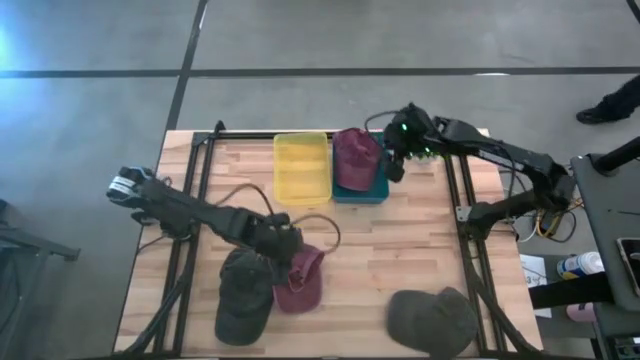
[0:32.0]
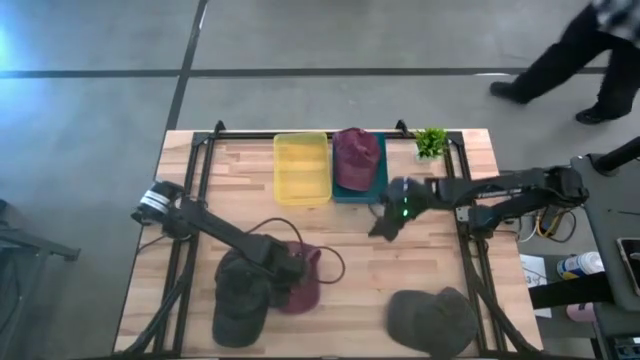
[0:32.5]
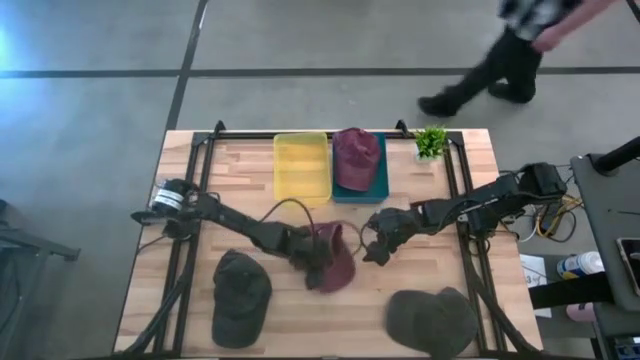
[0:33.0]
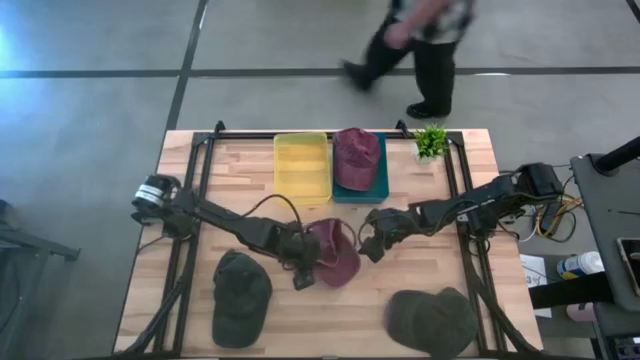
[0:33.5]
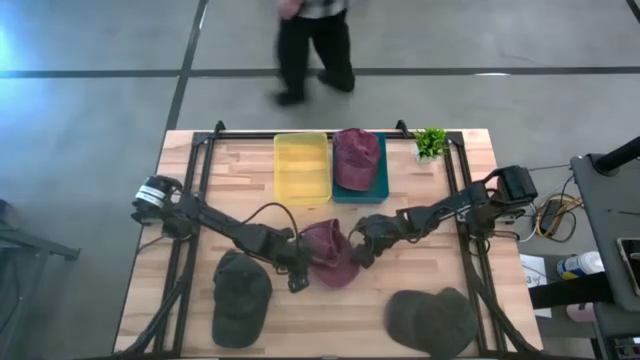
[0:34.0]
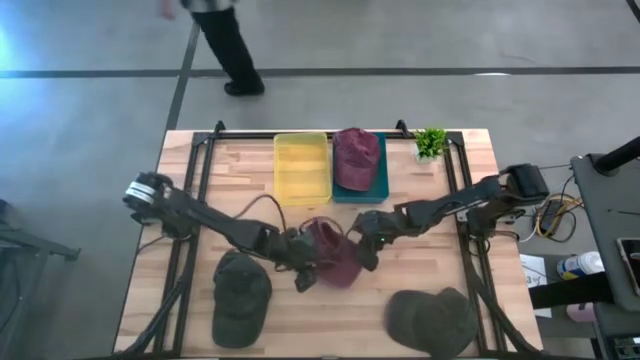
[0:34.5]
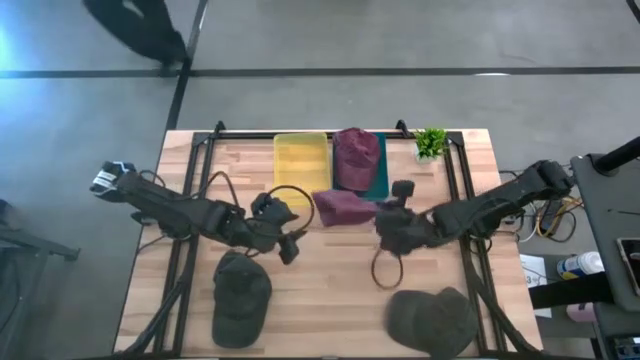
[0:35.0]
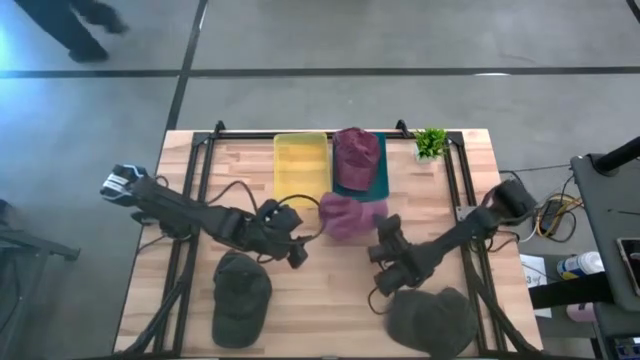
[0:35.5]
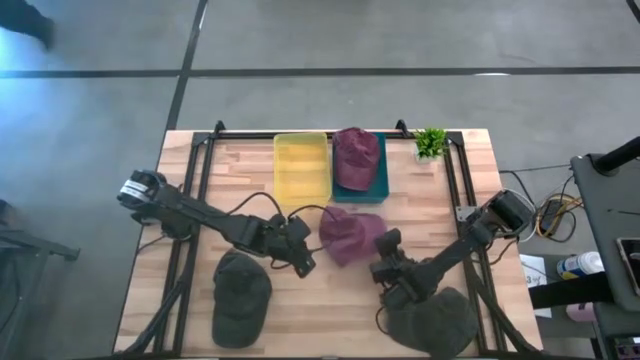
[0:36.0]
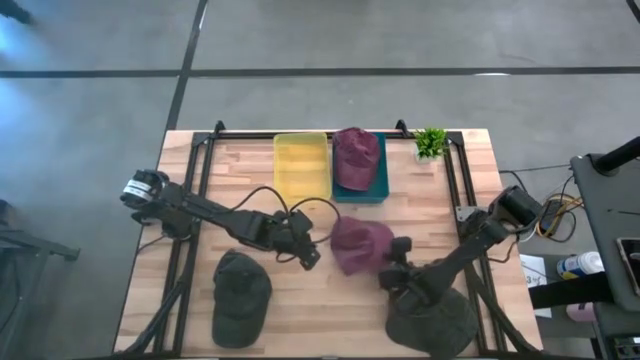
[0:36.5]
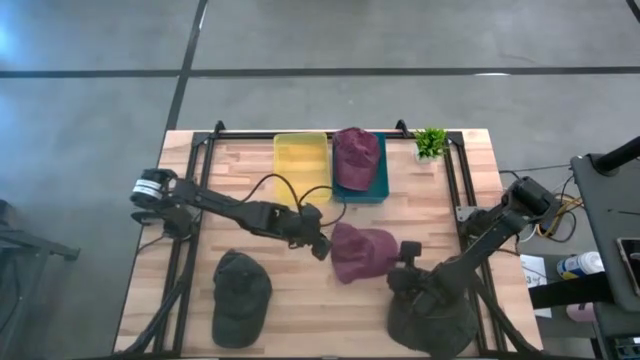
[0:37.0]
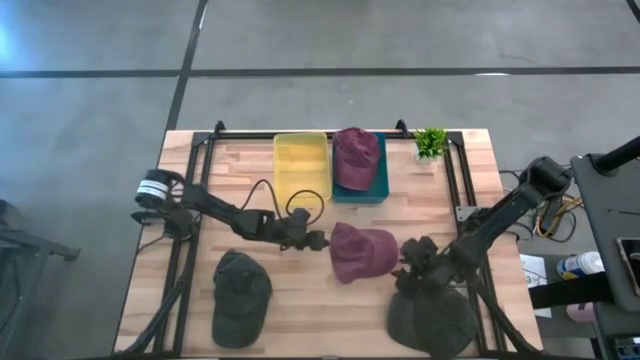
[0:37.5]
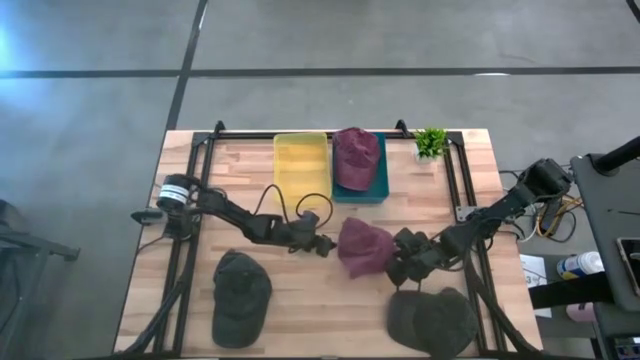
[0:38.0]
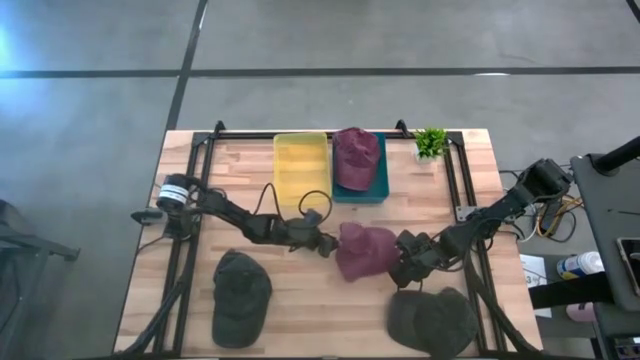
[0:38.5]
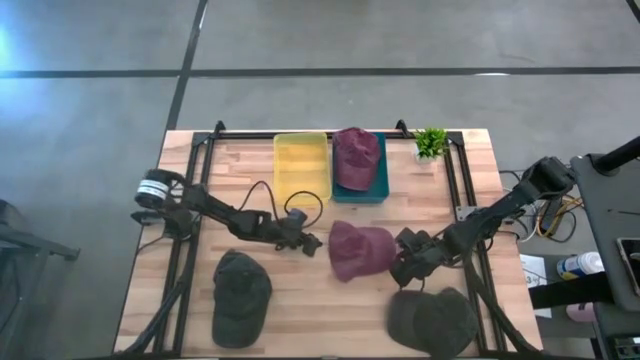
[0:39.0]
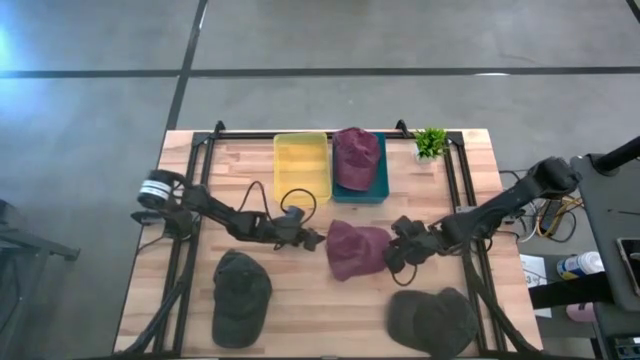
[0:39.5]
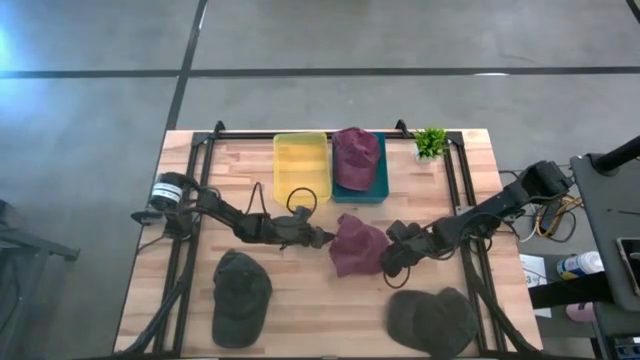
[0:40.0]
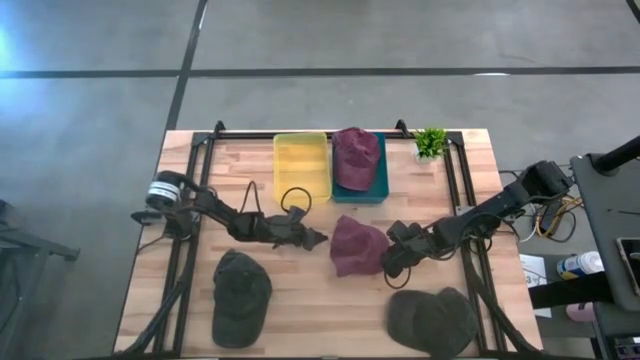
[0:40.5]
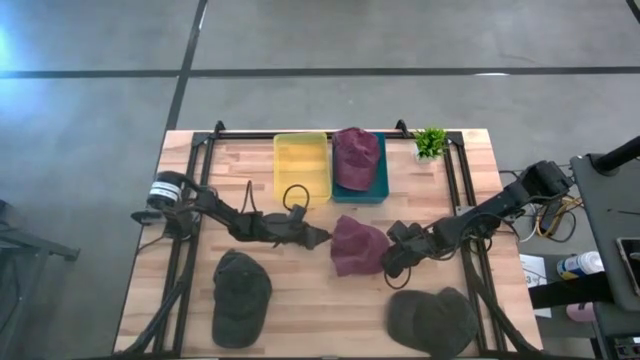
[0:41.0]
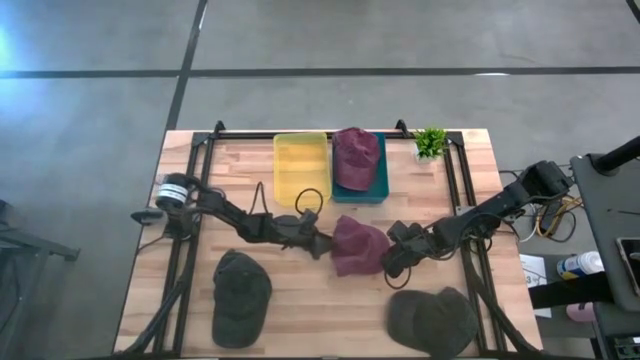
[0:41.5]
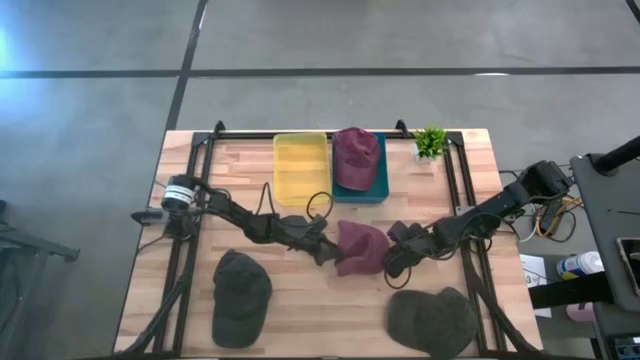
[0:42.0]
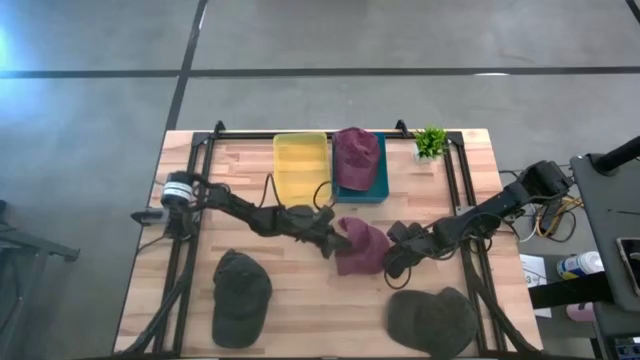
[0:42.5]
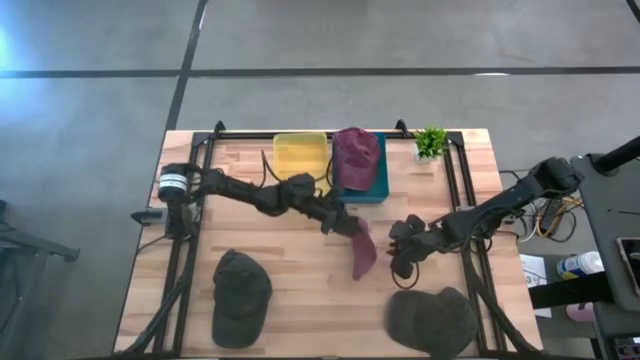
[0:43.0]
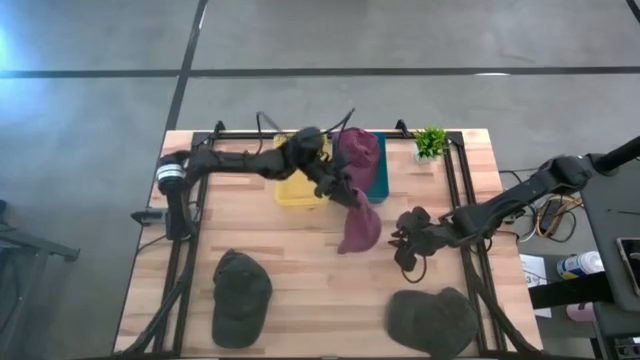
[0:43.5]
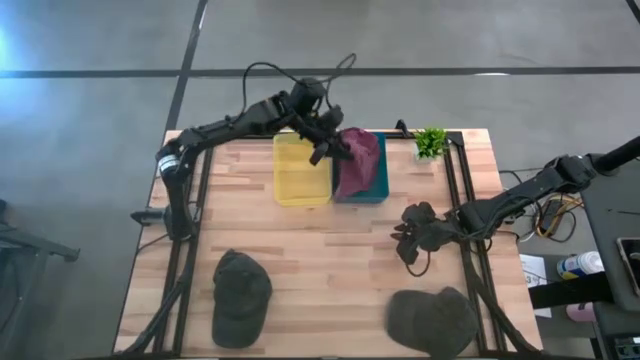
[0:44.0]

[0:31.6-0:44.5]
Task: Sort caps
Put the red cap into the blue bin
